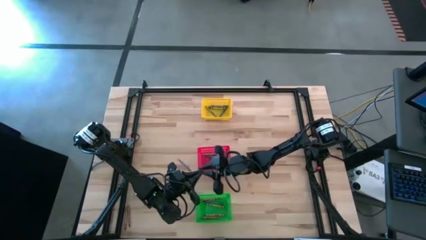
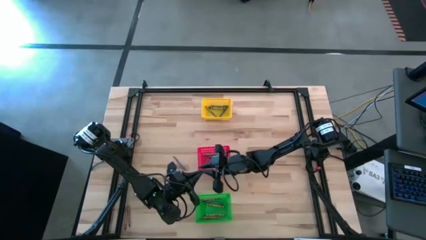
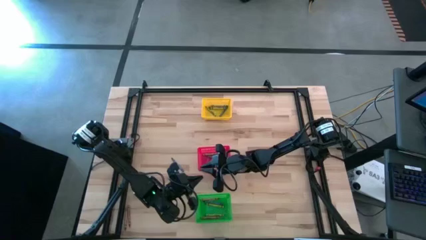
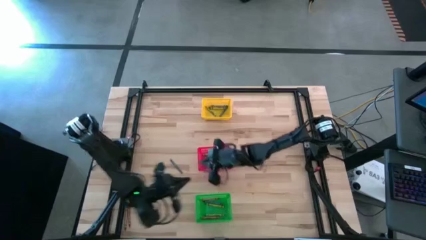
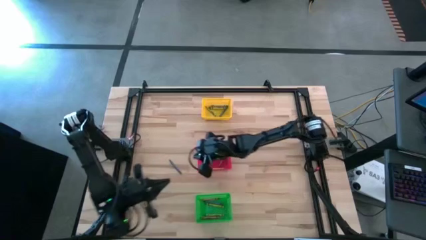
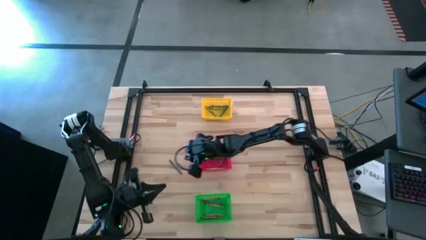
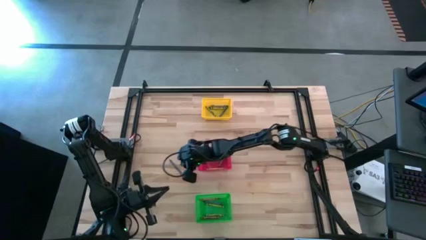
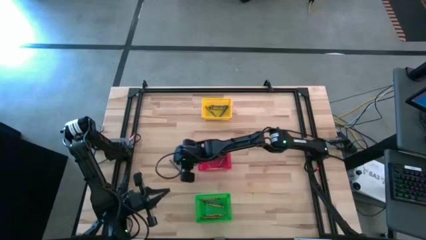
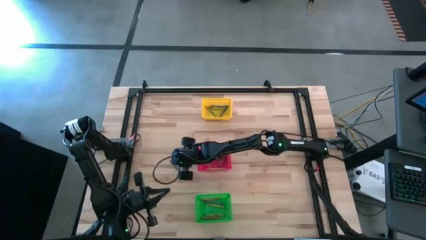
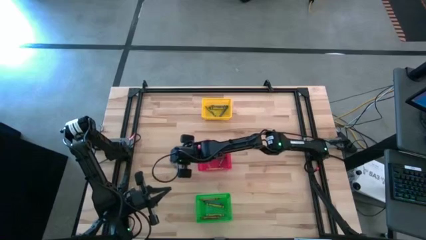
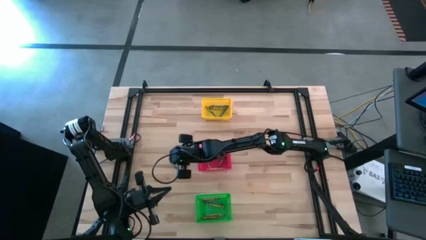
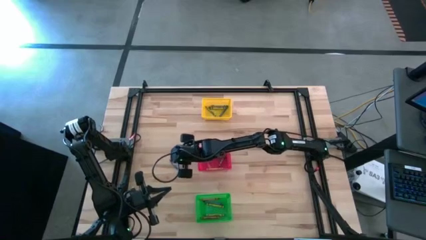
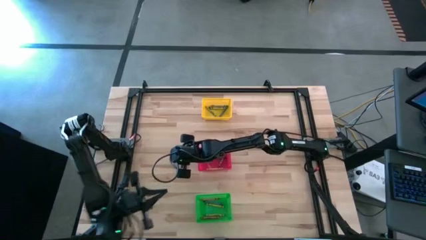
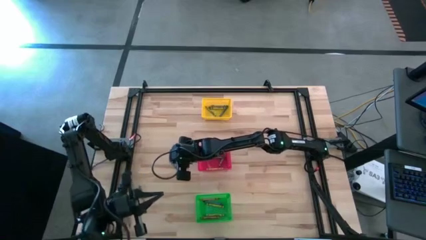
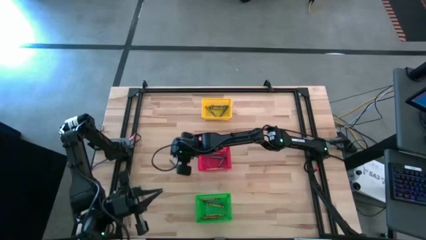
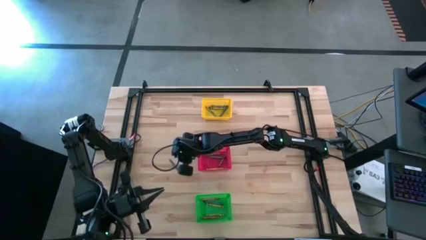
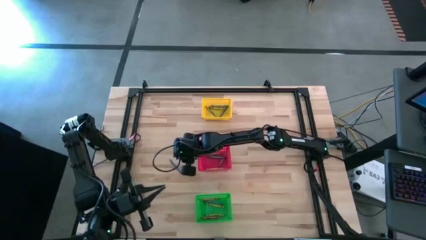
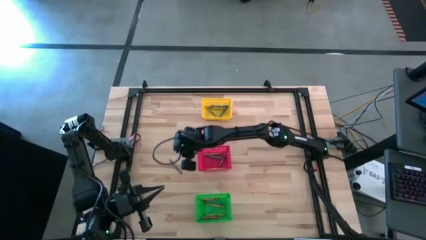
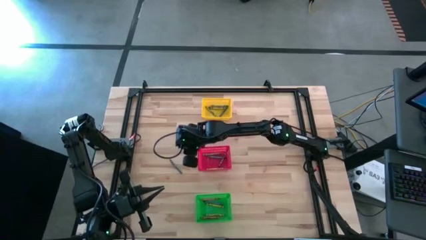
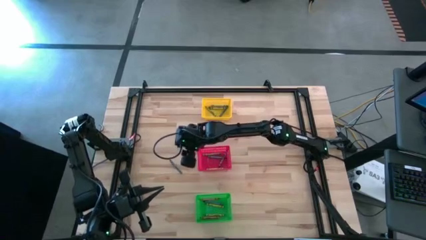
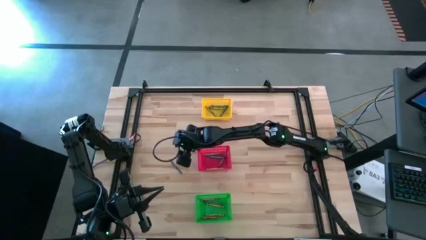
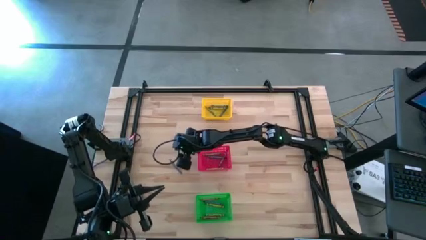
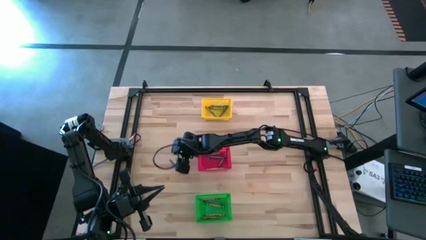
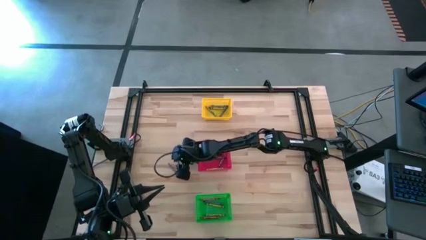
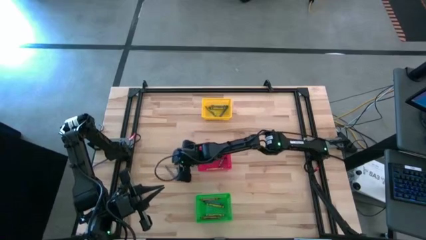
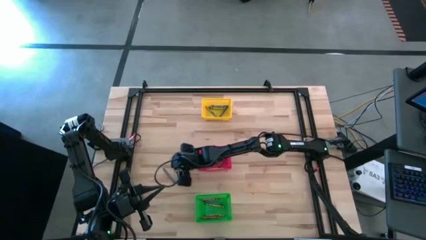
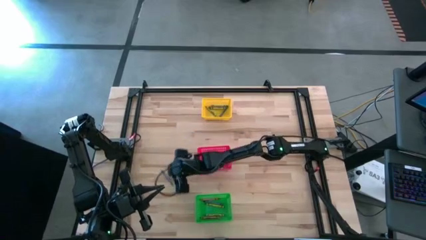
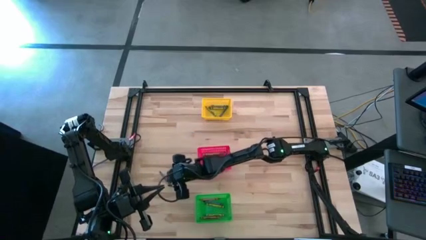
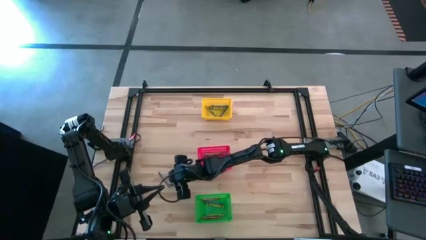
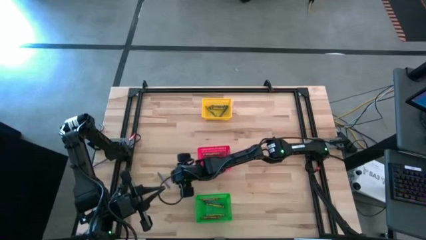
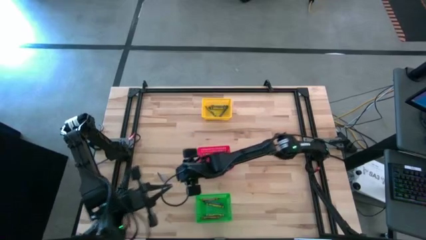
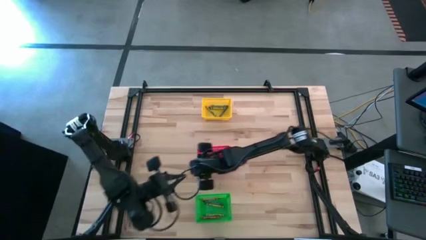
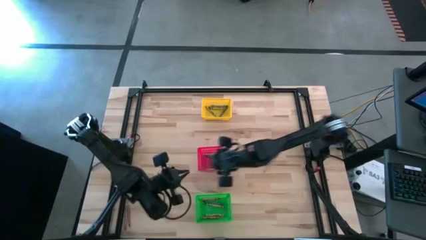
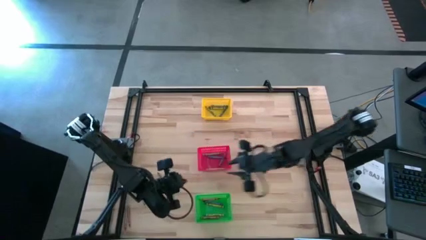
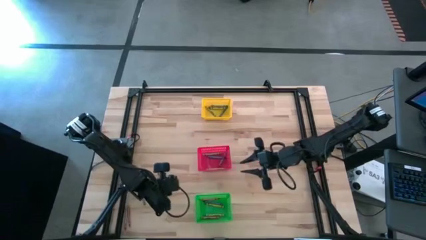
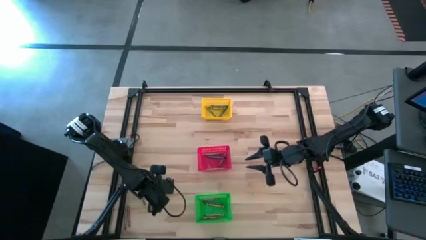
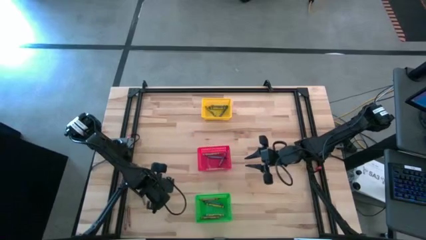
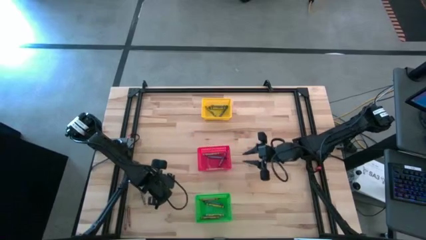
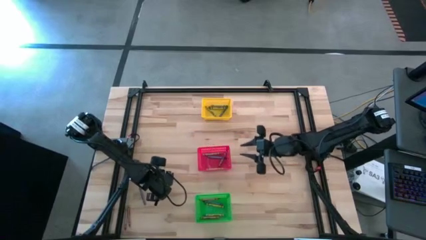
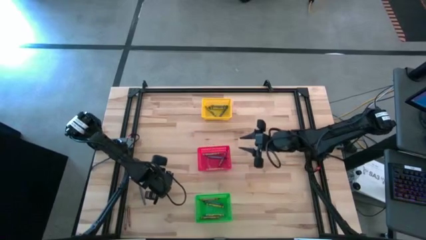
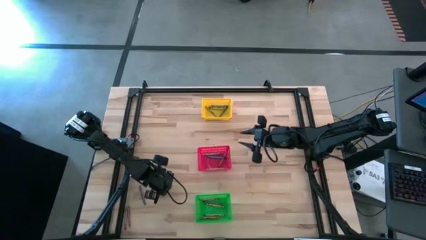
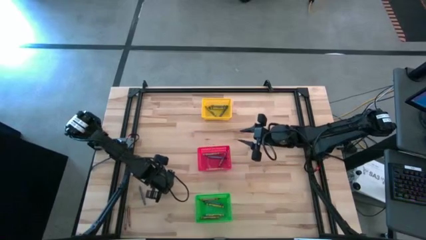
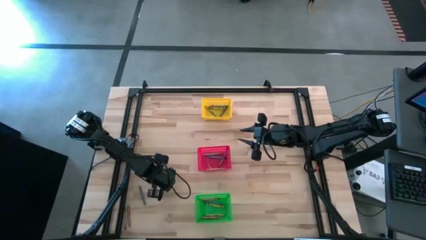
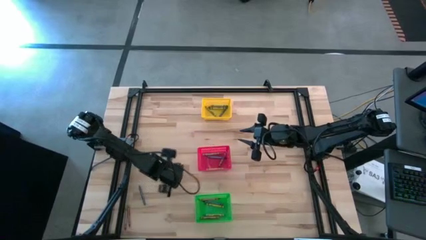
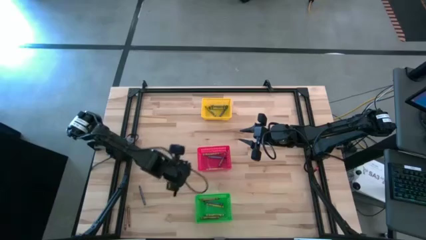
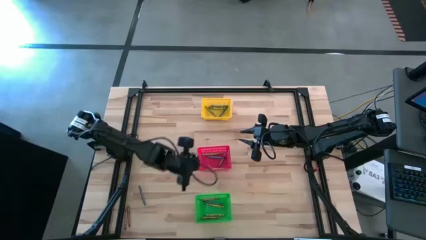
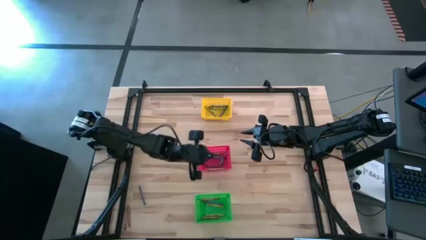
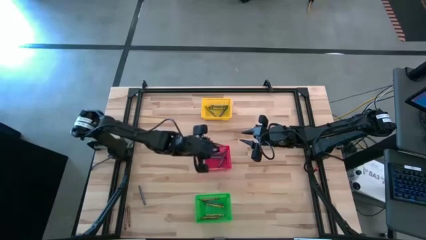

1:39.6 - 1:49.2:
Task: Sort crayons
Put the blue crayon into the red bin

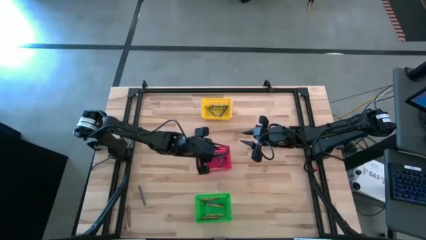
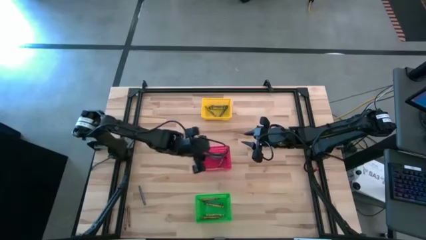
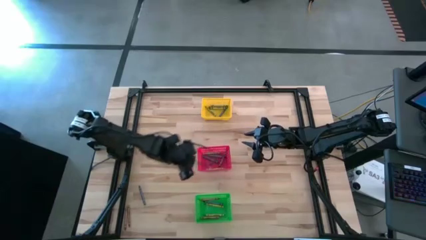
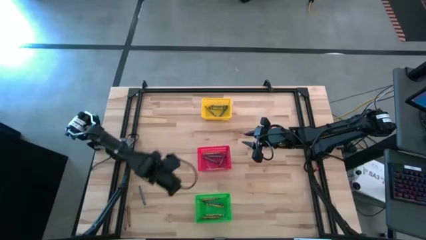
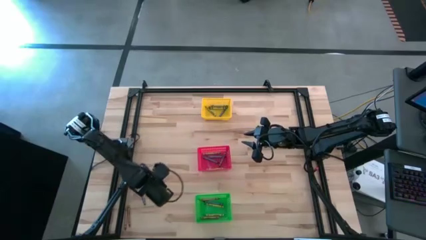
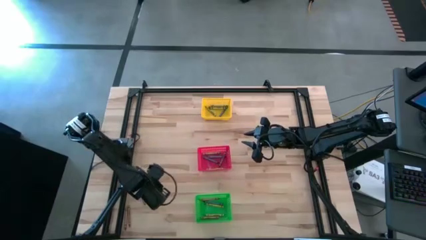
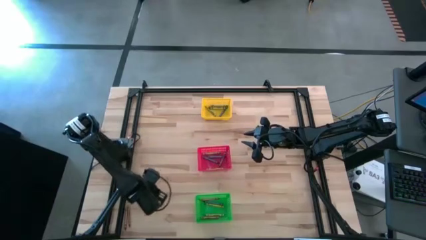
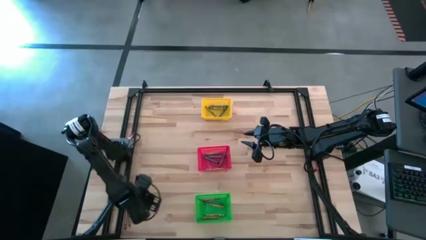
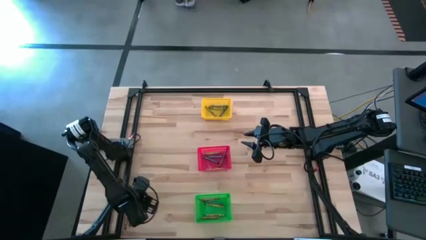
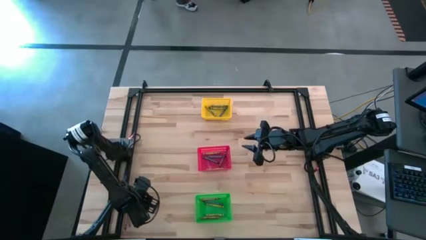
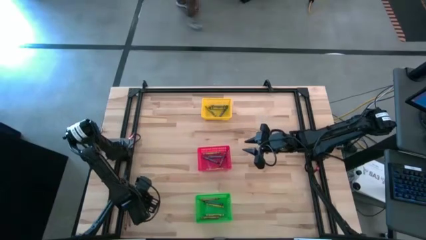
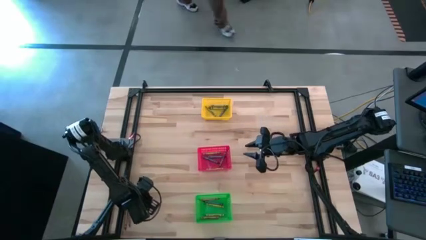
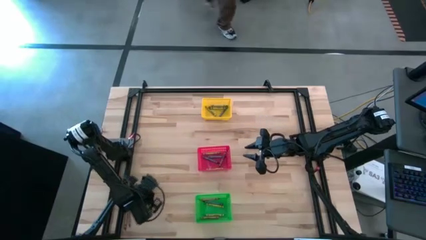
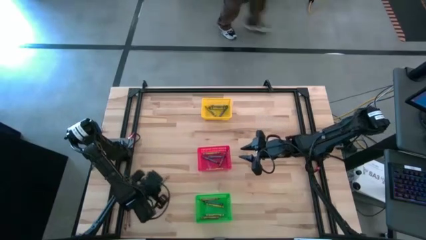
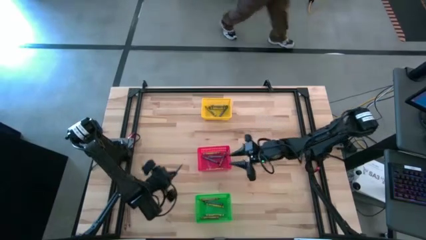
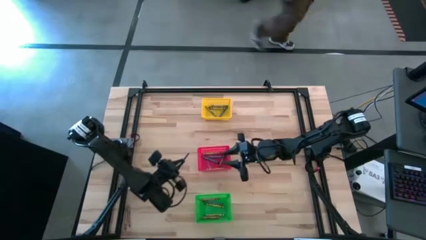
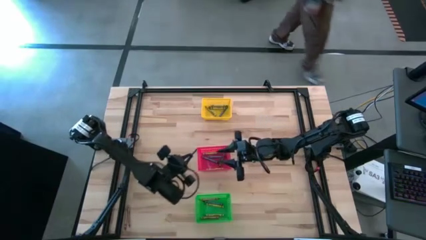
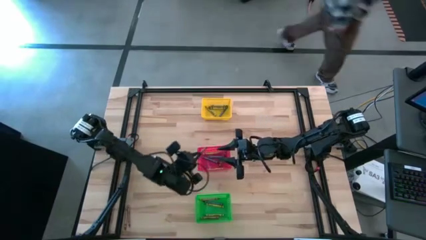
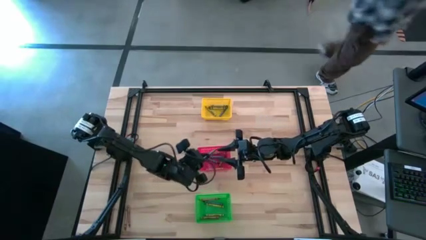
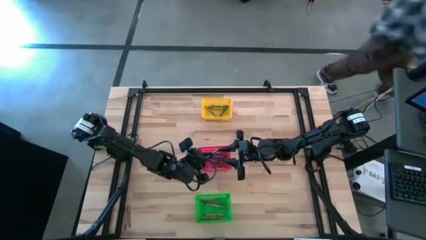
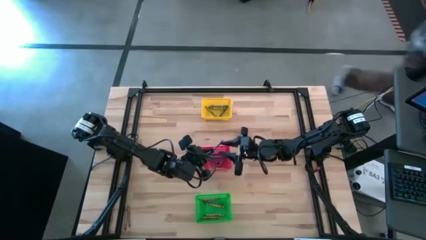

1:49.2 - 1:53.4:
Put the blue crayon into the red bin
